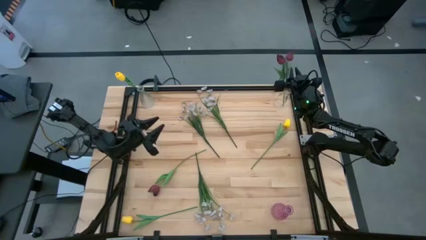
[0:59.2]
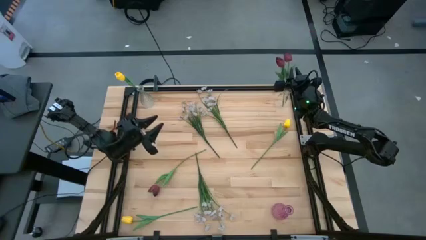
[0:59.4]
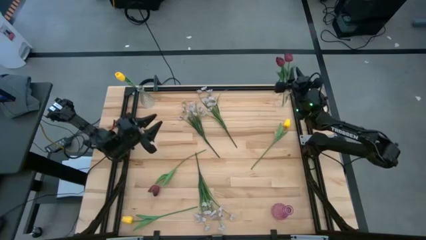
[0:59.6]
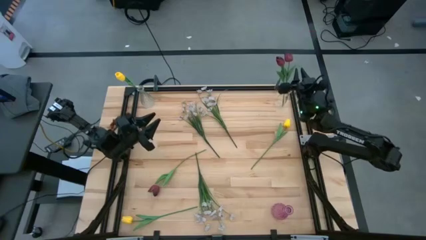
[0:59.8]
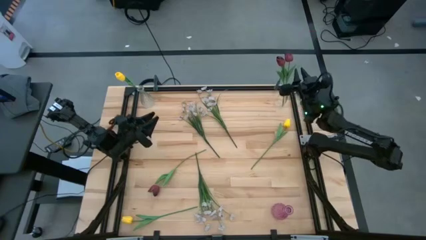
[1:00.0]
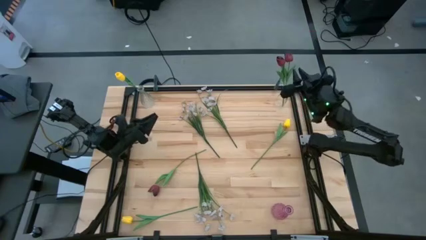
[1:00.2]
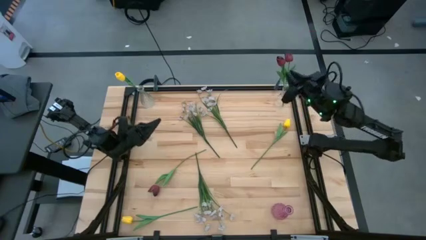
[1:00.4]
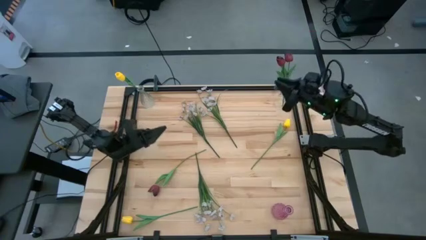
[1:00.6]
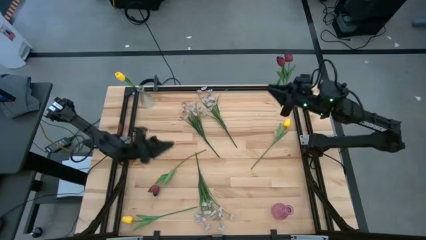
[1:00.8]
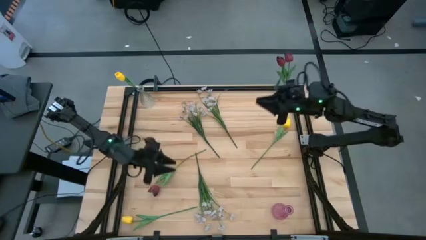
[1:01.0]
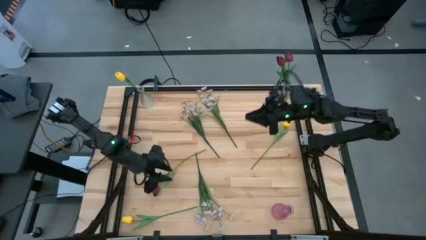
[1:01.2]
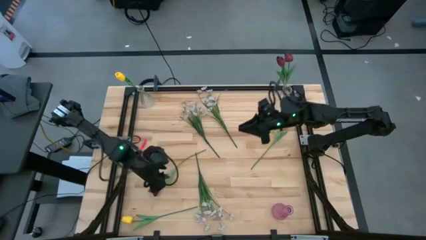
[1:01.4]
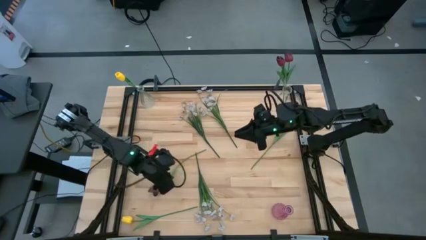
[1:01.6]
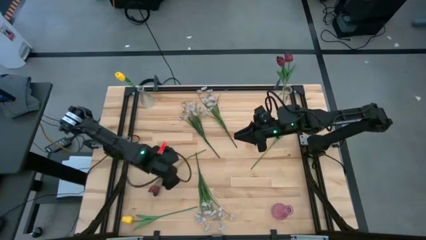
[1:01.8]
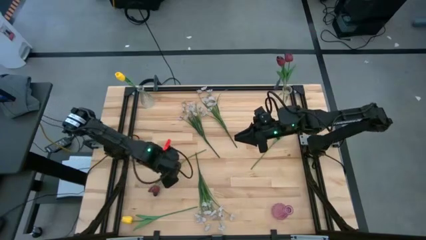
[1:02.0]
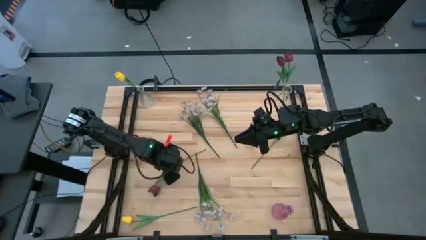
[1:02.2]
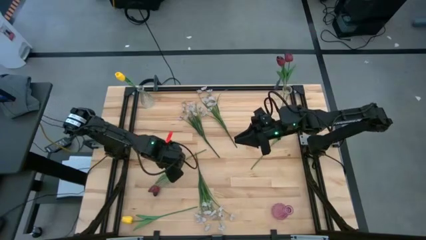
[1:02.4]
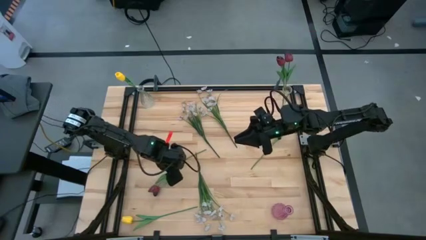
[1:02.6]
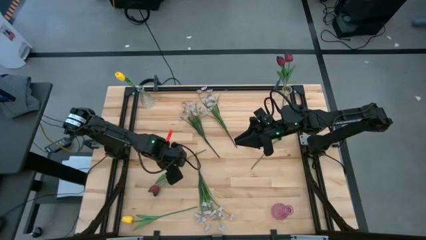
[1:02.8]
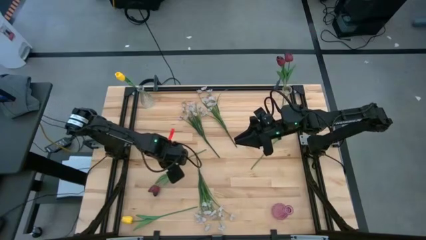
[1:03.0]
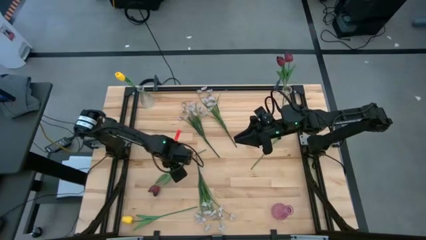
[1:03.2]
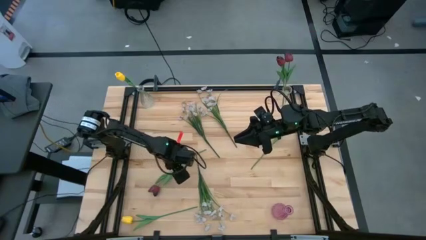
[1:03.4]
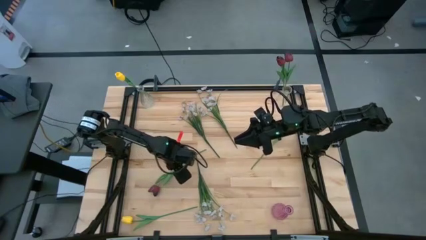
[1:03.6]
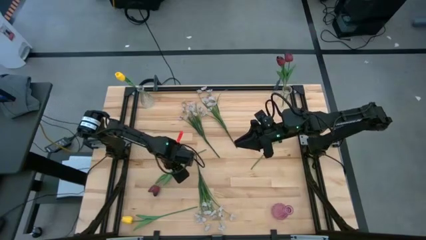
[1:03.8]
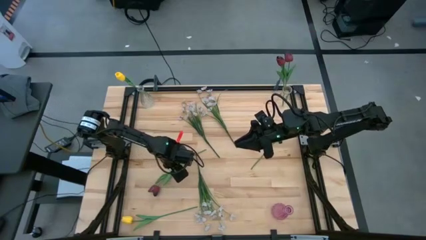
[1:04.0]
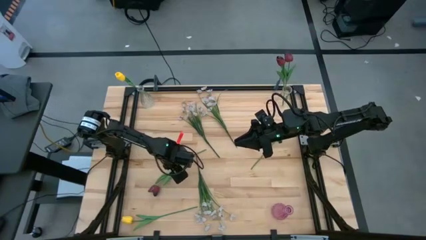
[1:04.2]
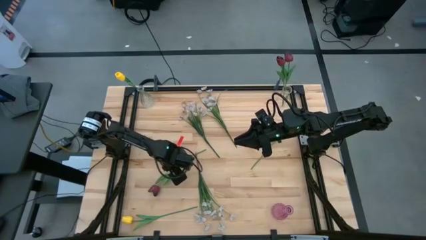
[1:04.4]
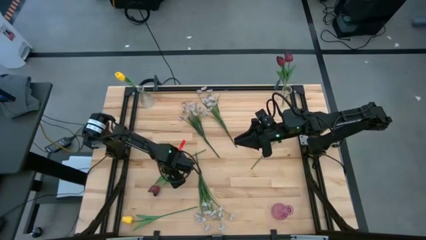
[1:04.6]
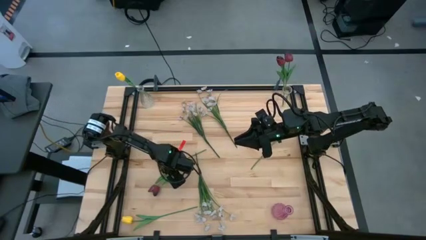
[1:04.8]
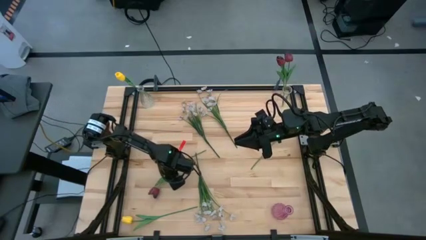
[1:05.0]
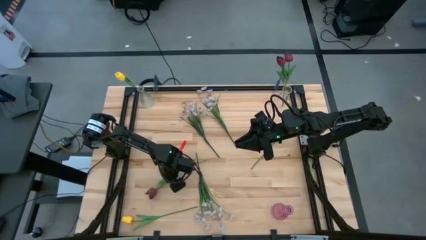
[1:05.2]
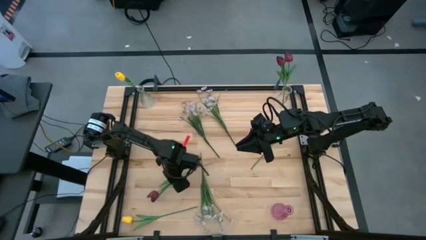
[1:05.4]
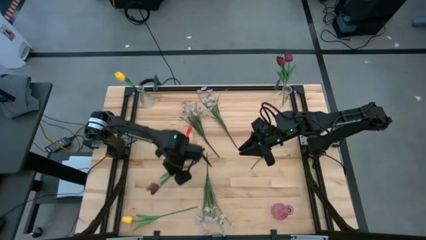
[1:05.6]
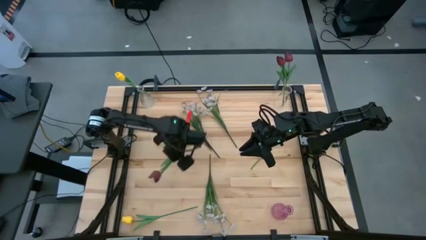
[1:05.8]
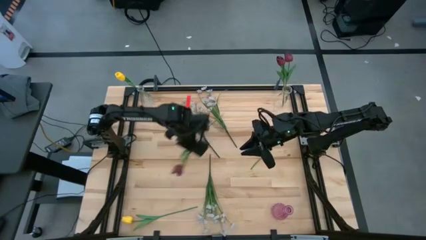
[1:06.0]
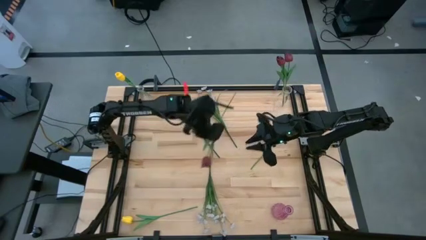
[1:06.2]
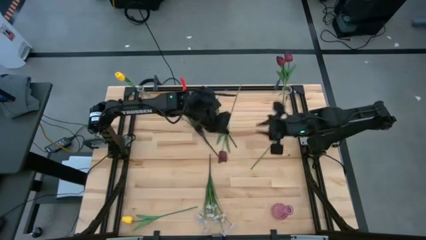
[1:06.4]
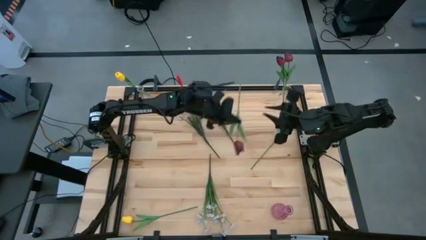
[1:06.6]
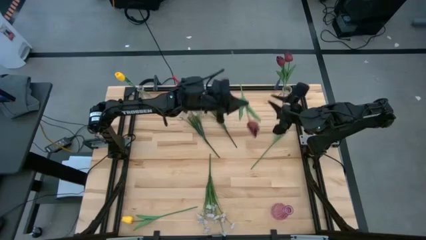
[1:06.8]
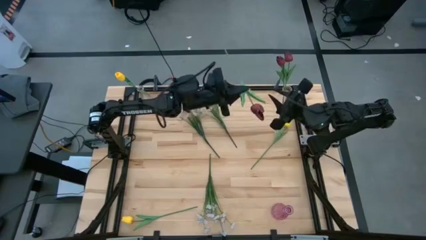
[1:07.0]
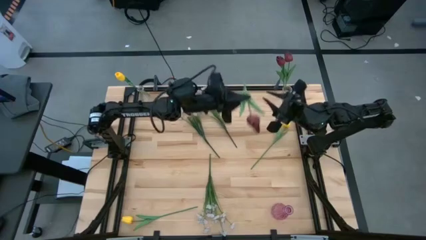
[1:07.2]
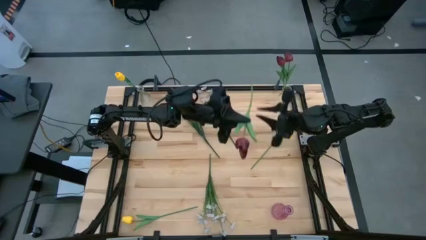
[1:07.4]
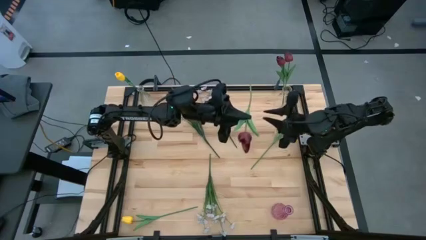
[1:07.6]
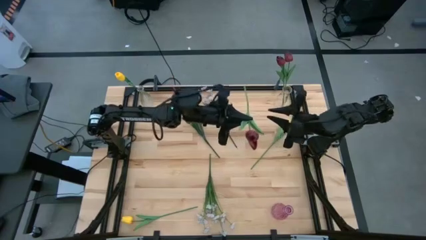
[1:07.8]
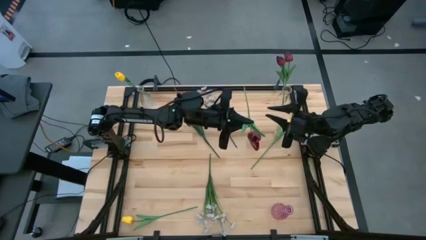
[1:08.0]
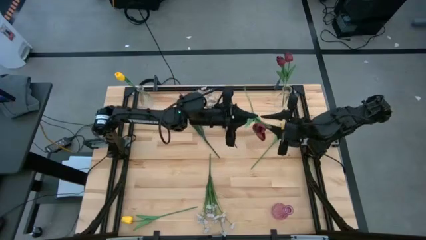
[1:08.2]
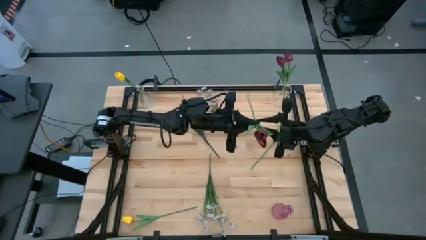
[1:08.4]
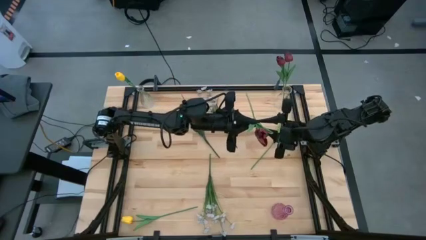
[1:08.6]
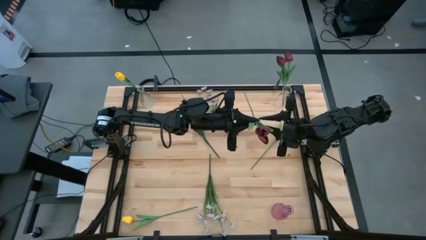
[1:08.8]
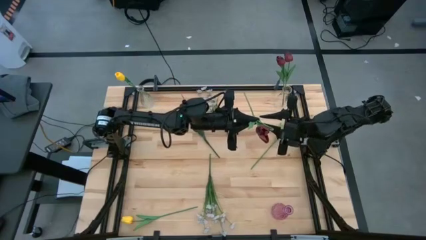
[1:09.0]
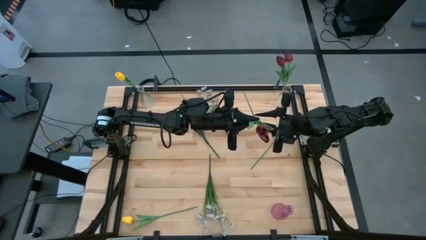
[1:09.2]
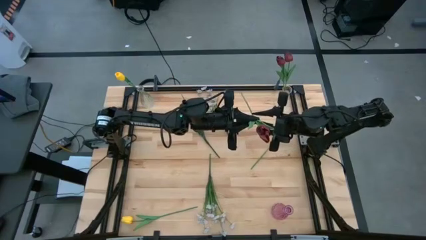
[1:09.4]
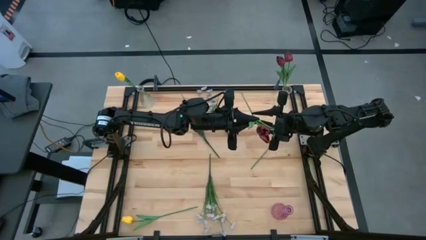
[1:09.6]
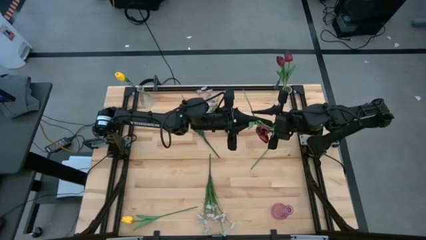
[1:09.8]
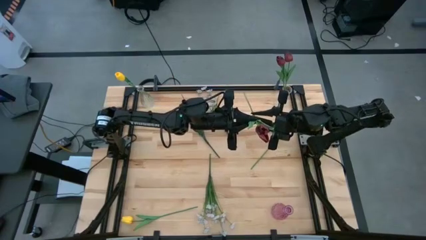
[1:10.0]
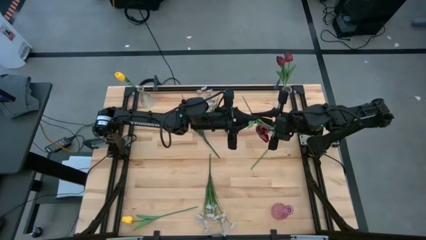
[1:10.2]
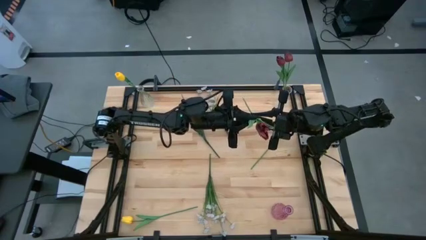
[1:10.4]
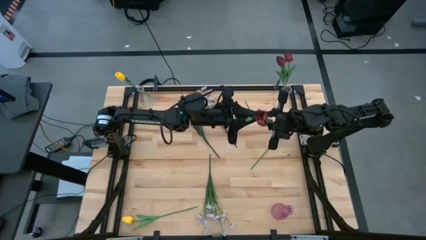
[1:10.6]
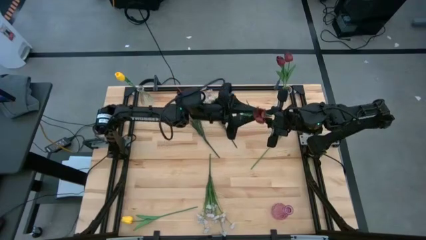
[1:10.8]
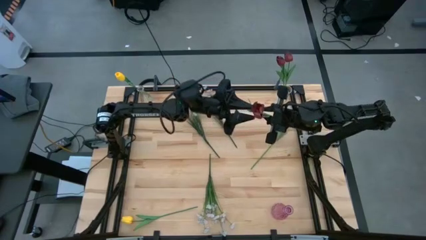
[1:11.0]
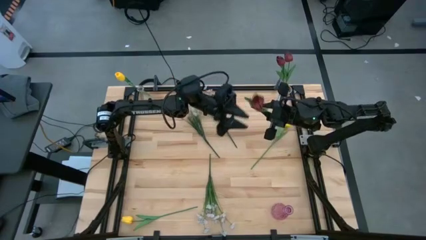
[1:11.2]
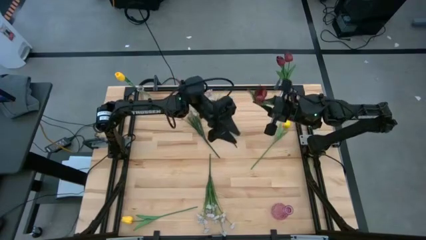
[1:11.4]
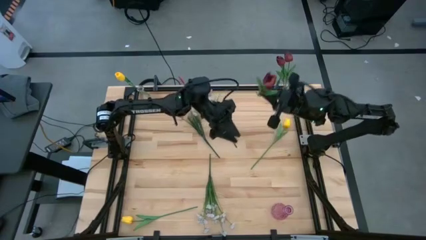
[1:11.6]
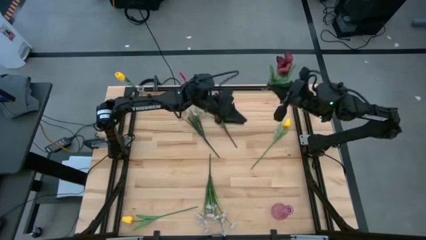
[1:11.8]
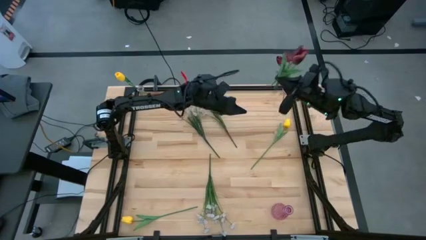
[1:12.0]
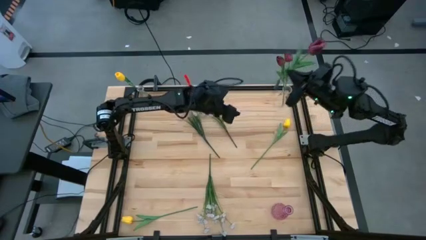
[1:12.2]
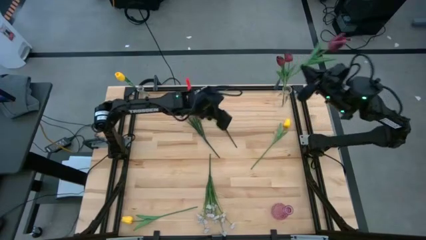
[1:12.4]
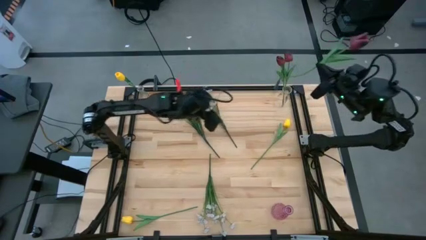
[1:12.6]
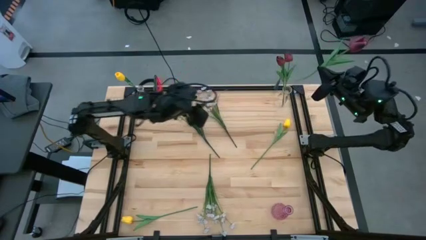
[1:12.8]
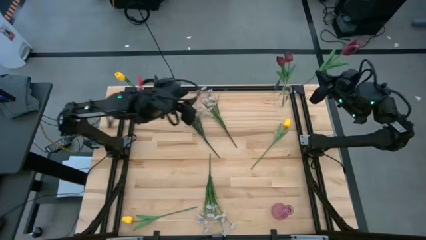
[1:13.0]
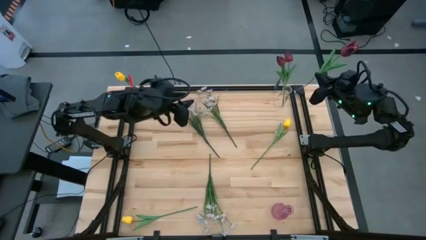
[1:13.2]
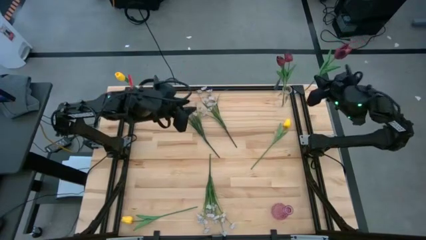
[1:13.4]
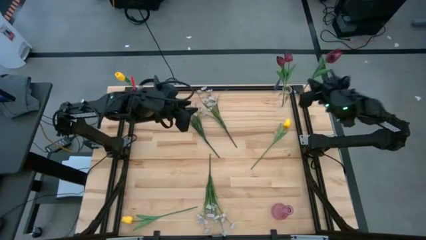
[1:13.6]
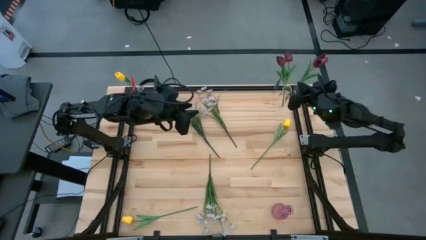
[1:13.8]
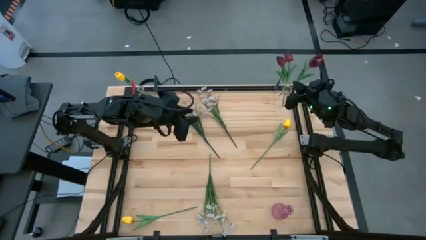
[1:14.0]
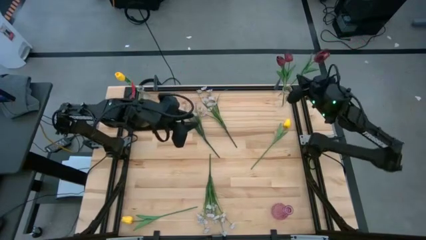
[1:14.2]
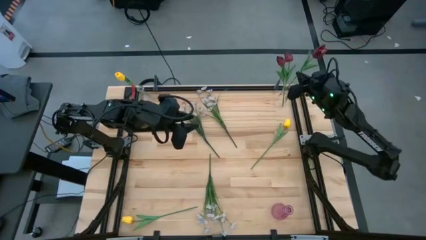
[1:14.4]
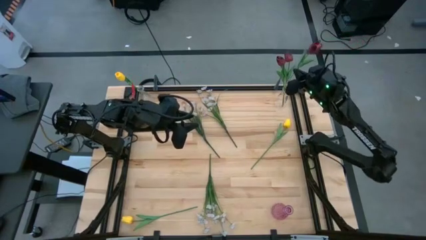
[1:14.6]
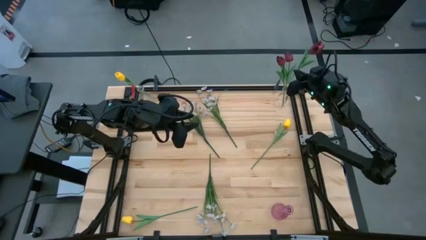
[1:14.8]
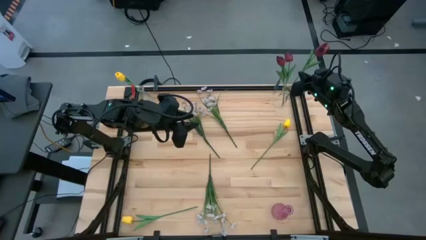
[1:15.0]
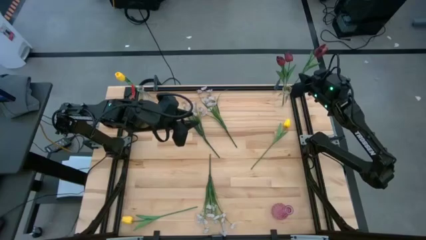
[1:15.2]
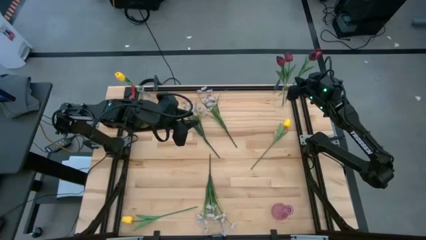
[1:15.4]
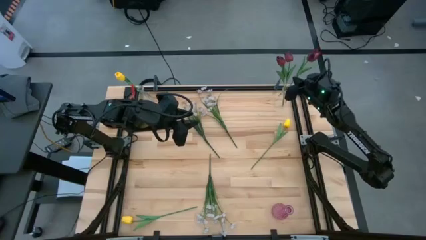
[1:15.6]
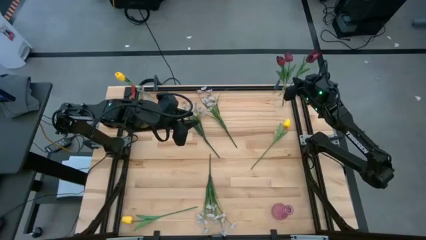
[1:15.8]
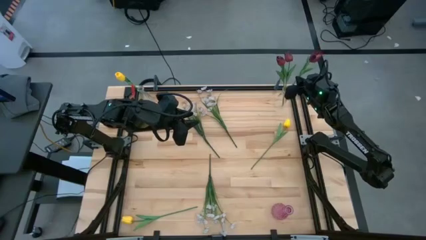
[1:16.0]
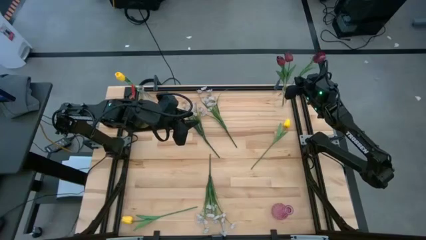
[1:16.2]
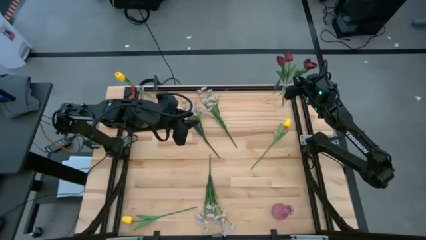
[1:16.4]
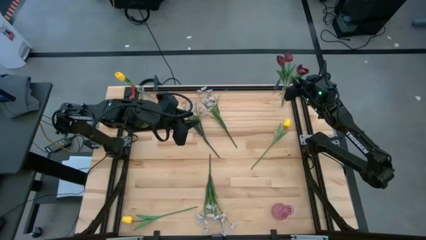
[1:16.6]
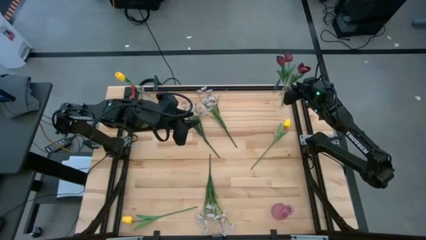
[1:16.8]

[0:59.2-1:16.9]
Task: Sort flowers into vase by color
Put the red flower into the right transparent vase
